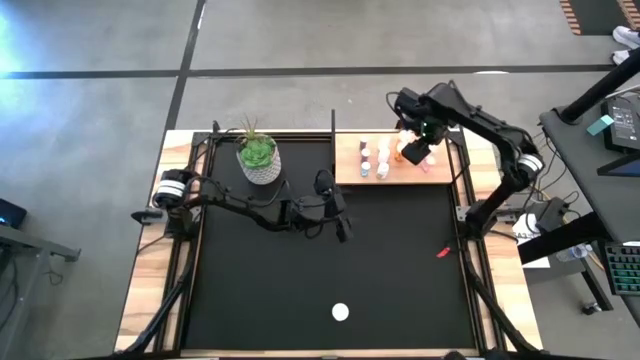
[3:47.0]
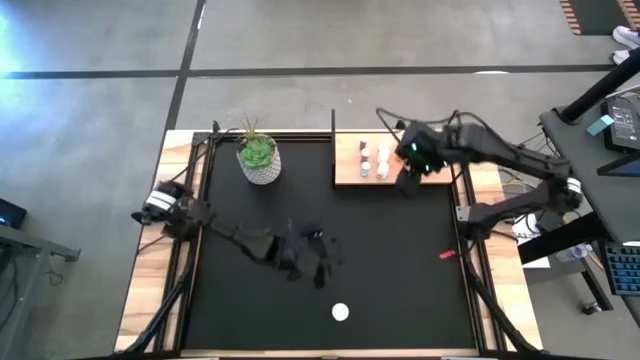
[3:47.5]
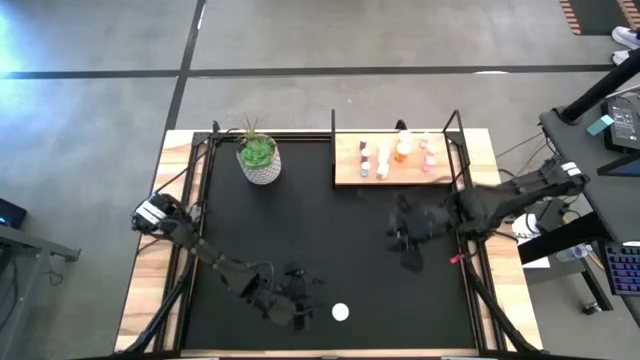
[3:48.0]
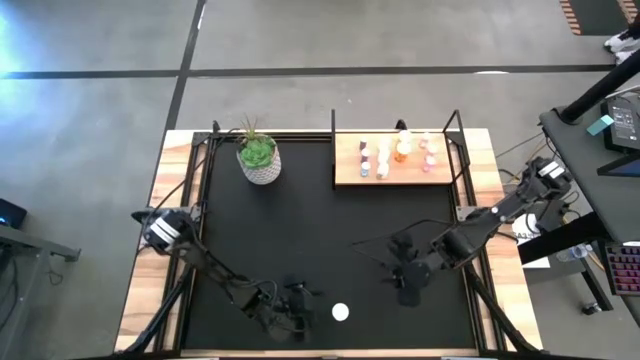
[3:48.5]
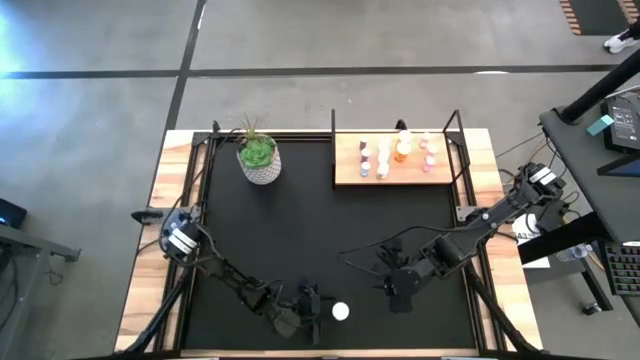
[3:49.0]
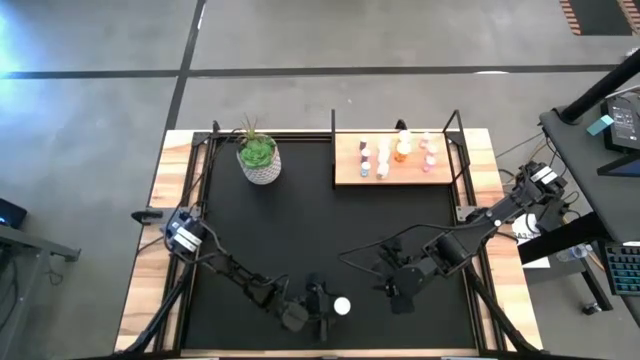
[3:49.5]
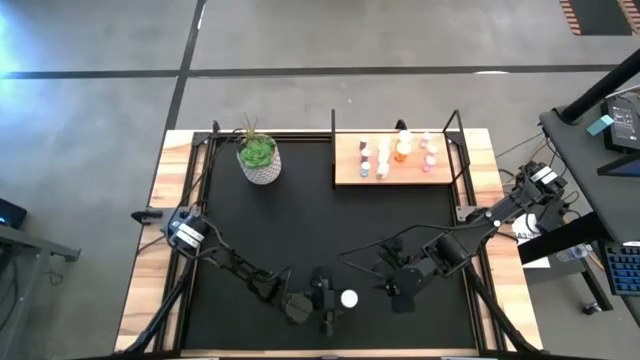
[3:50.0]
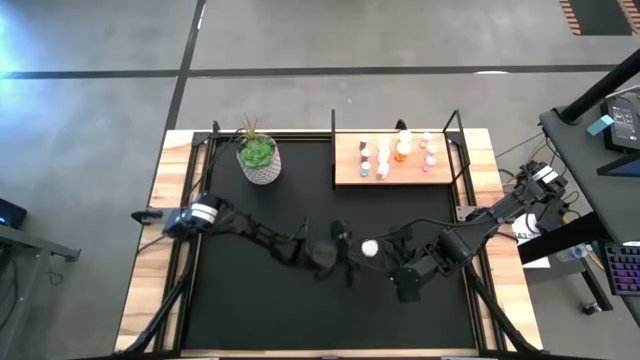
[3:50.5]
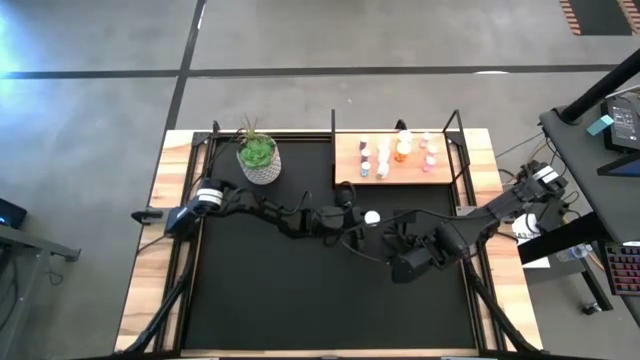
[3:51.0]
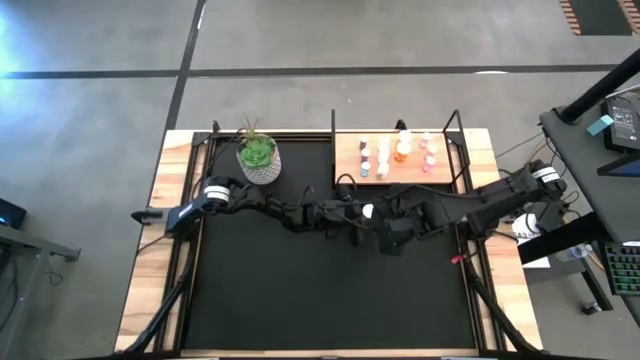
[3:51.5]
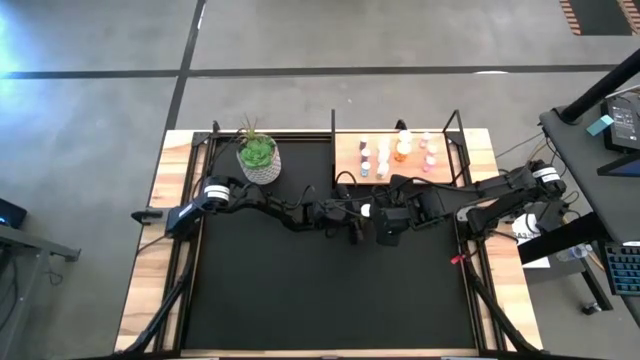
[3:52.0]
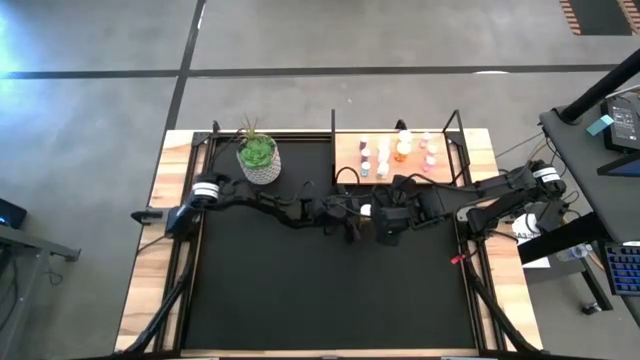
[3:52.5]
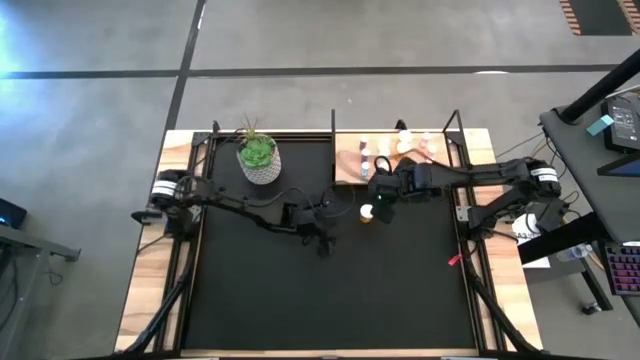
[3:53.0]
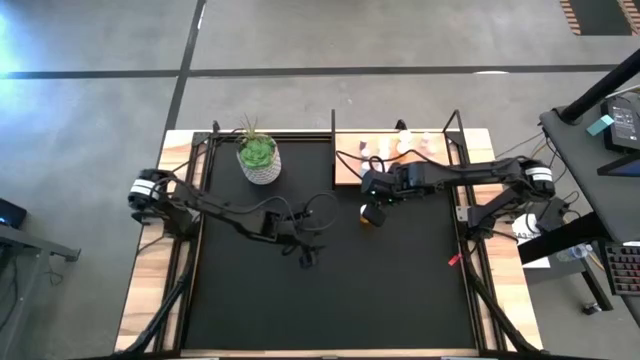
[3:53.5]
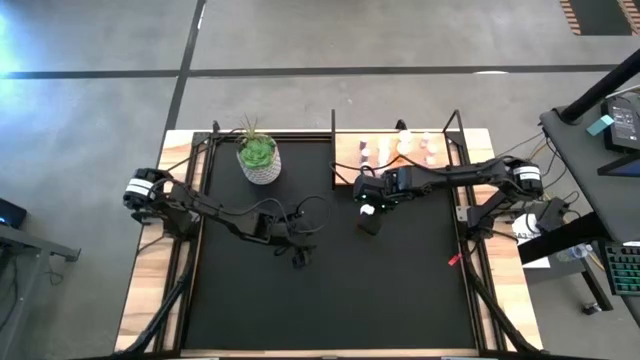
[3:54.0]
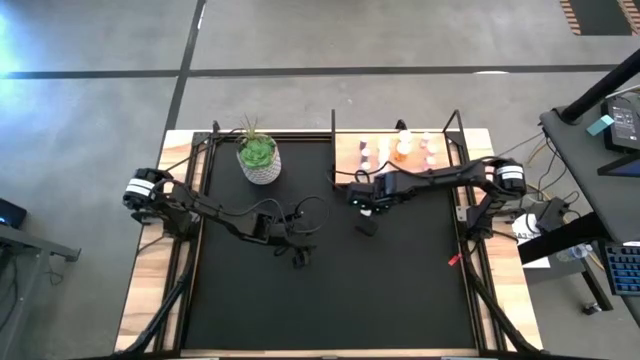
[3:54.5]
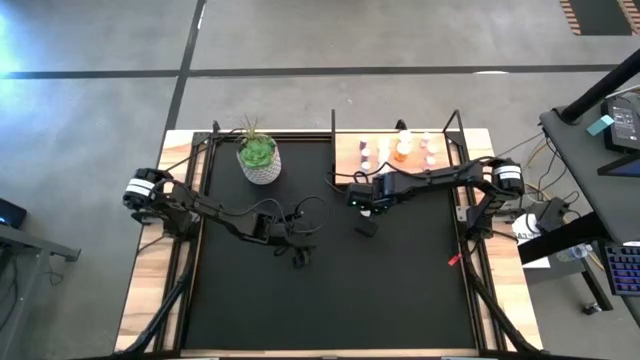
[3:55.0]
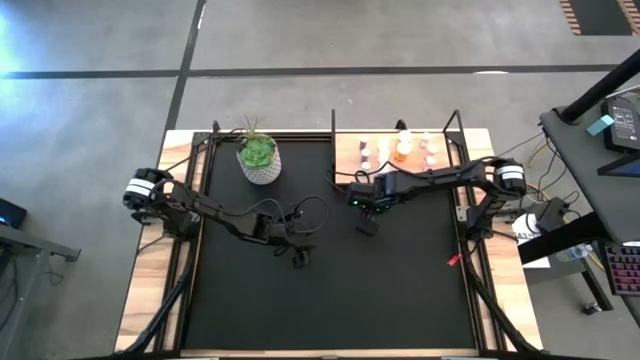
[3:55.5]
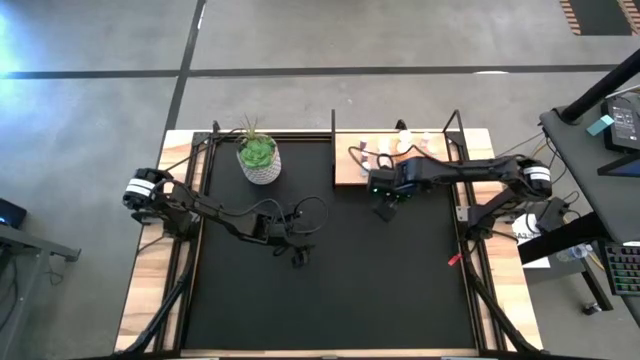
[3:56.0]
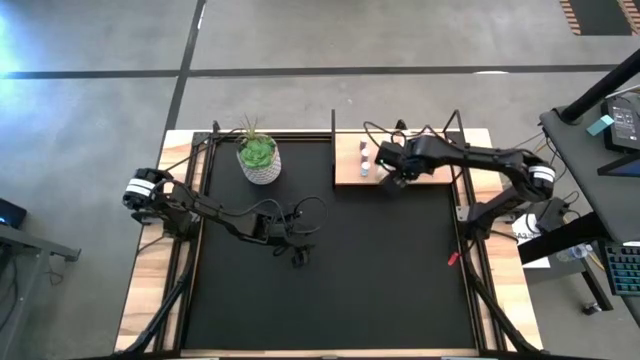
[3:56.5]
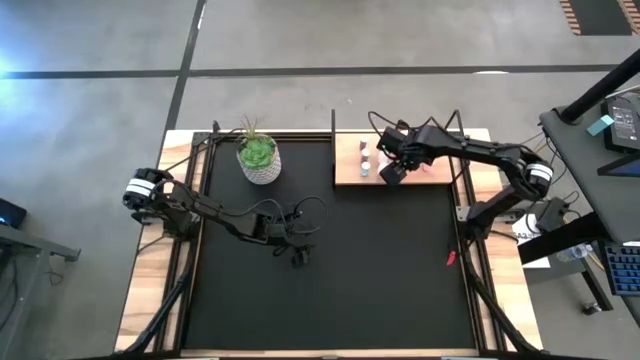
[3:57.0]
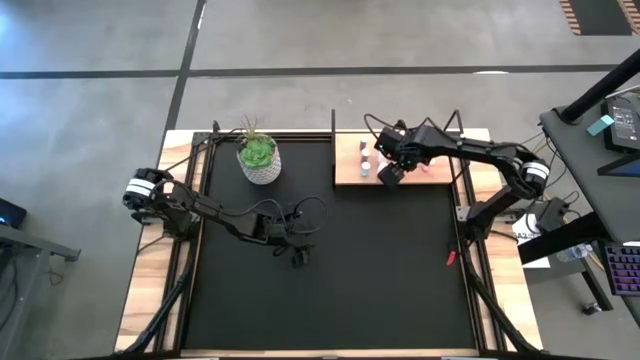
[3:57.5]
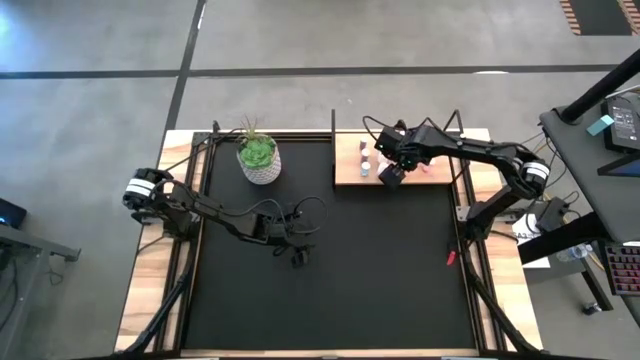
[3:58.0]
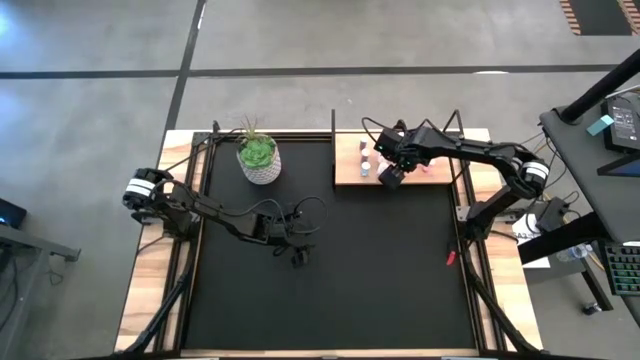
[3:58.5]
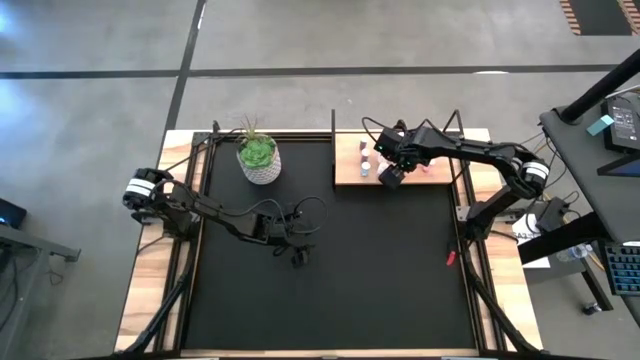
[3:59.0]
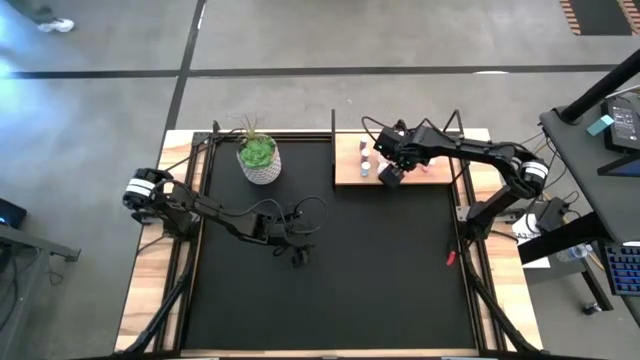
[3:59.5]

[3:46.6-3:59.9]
Task: Pick and place medicine bottles onto shelf by color
Put the orange pill bottle on the shelf aligned with the other orange pill bottles

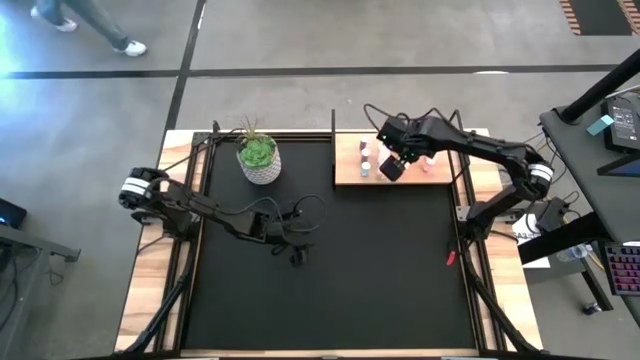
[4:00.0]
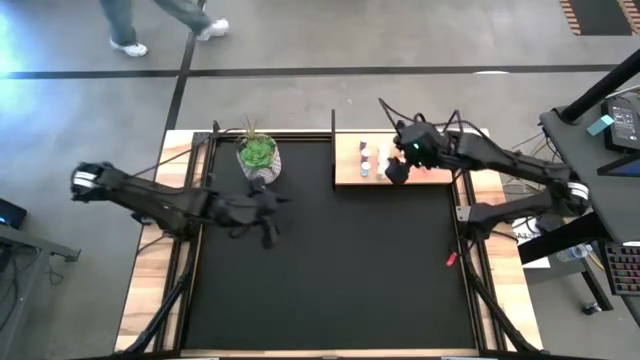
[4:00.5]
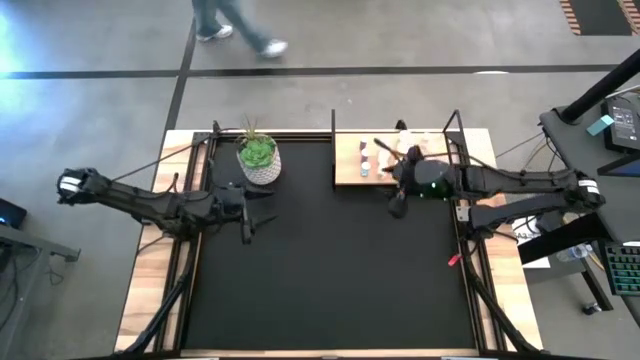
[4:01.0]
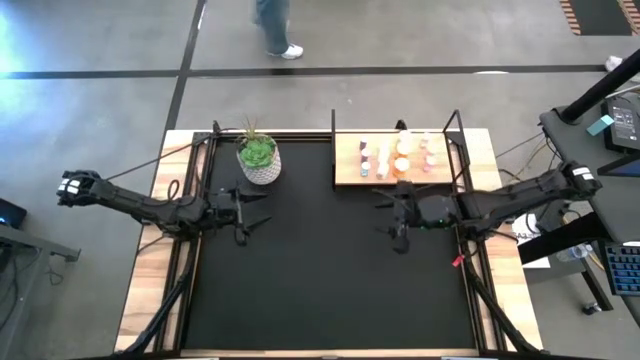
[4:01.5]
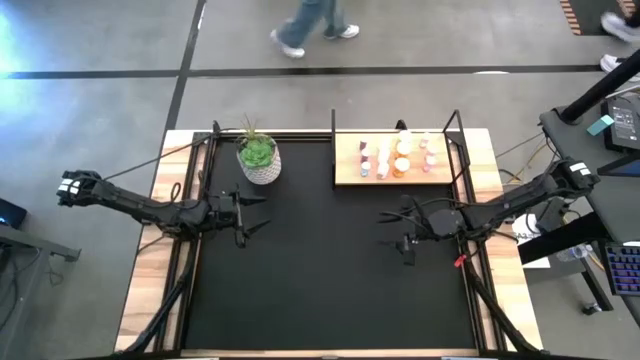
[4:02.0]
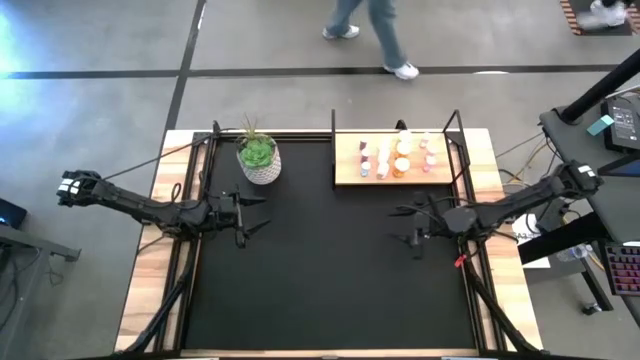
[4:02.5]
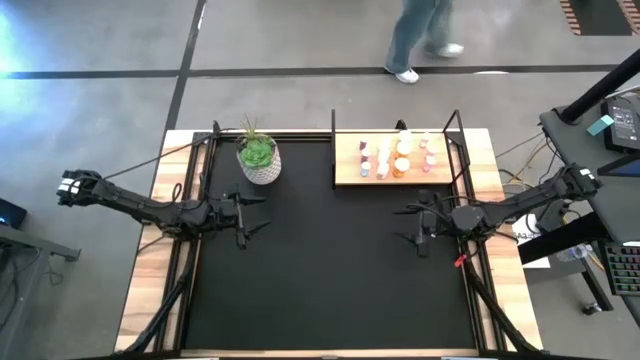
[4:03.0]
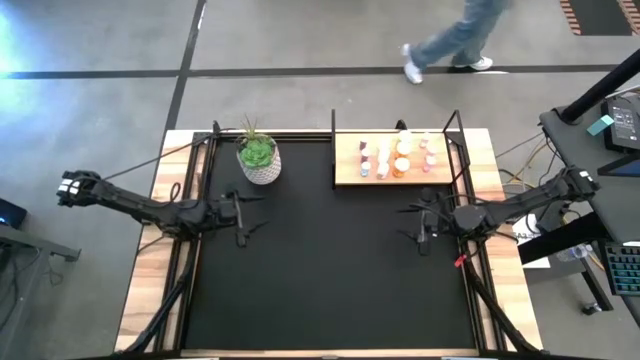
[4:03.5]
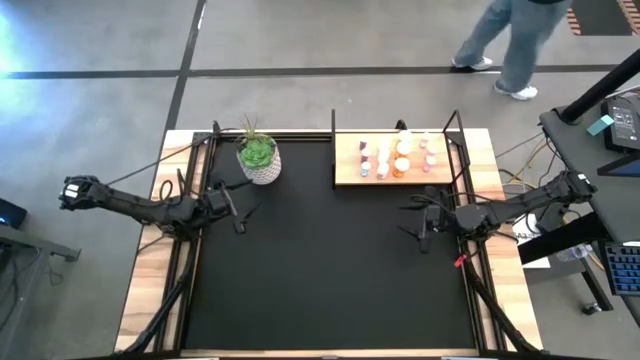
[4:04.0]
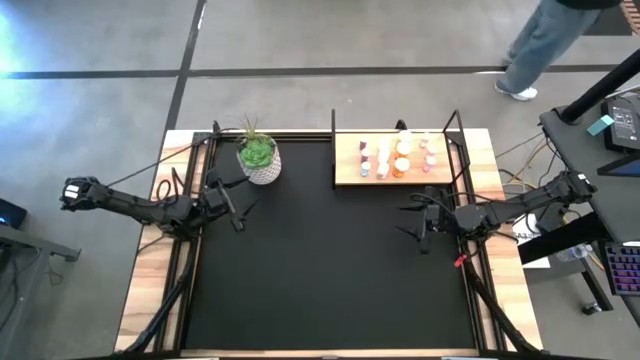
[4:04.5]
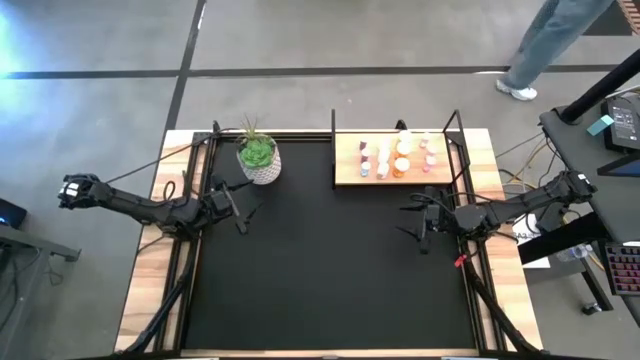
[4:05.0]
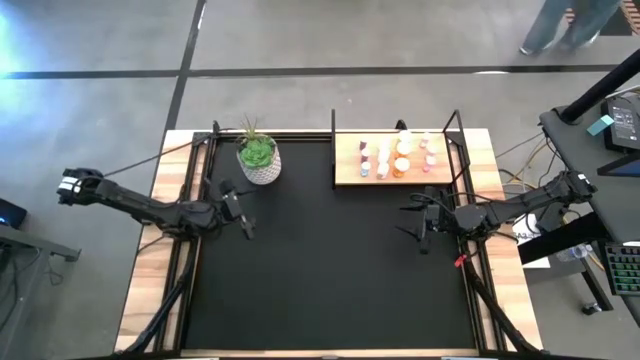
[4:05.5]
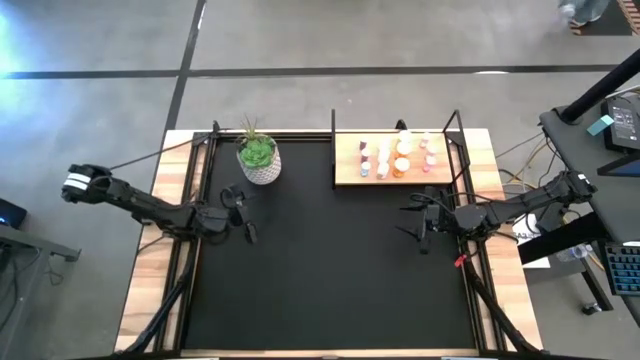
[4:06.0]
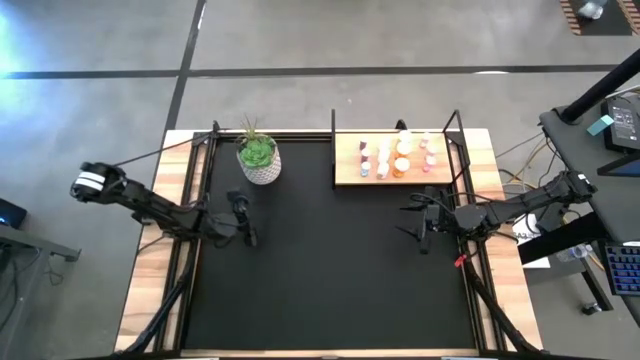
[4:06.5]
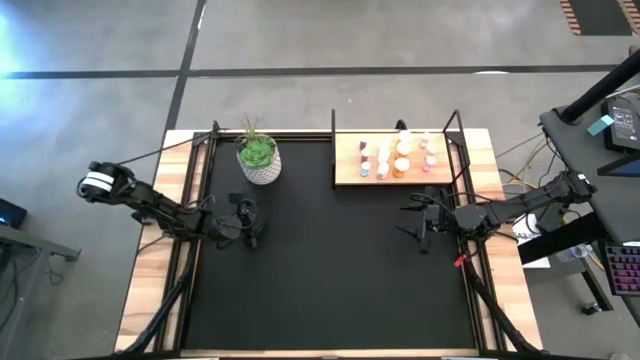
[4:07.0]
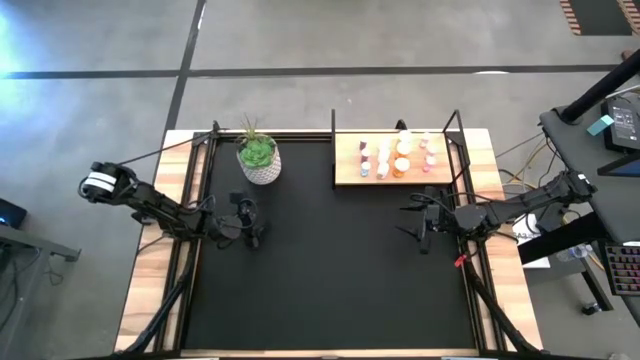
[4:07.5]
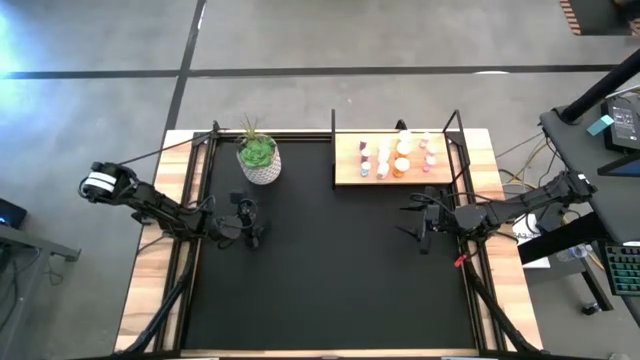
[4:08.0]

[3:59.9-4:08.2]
Return to Home Position
